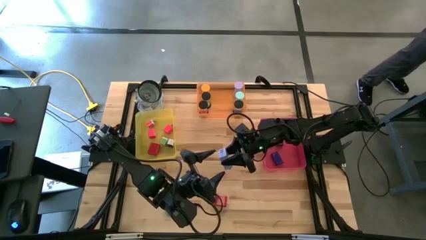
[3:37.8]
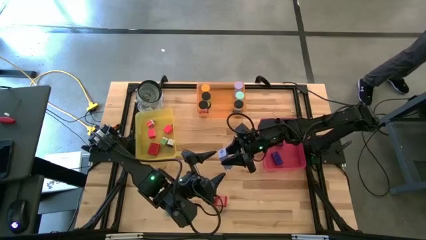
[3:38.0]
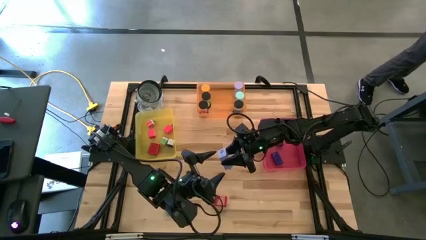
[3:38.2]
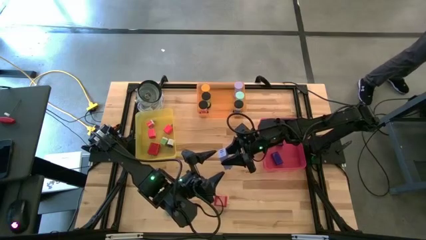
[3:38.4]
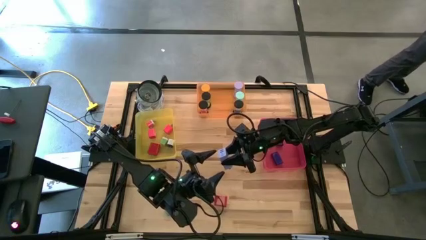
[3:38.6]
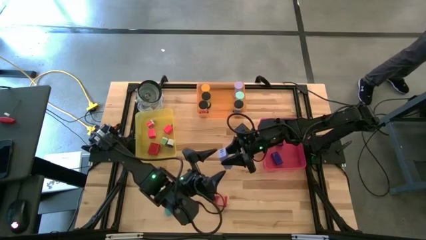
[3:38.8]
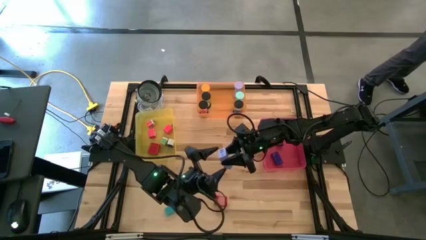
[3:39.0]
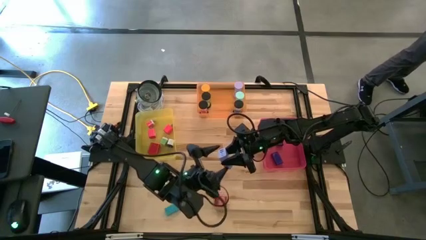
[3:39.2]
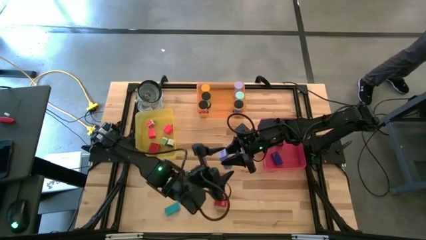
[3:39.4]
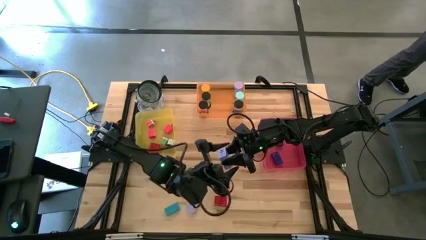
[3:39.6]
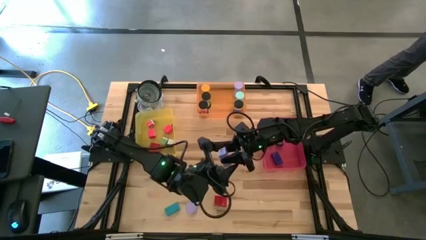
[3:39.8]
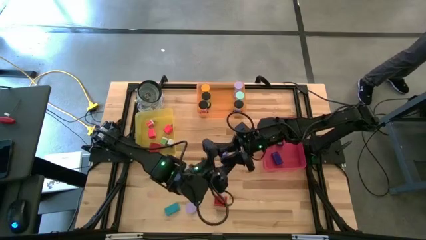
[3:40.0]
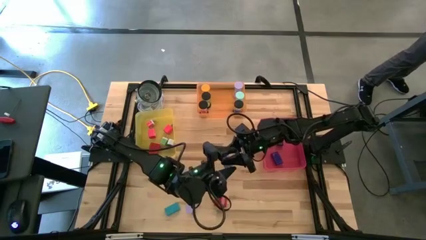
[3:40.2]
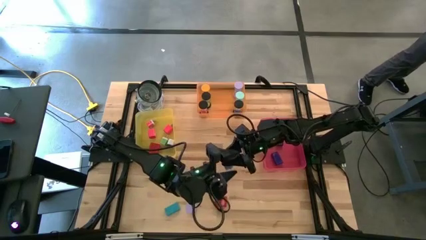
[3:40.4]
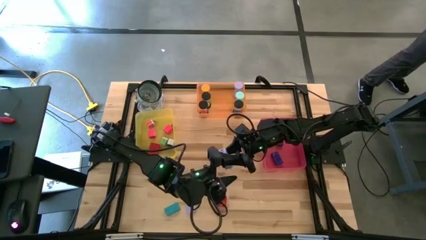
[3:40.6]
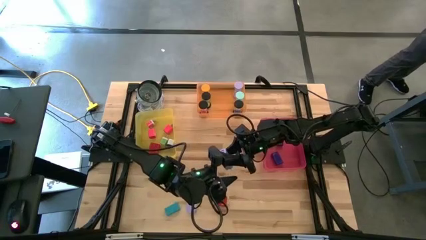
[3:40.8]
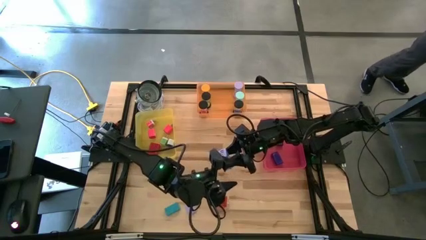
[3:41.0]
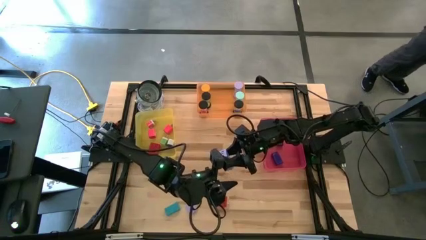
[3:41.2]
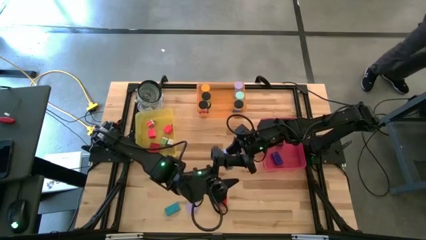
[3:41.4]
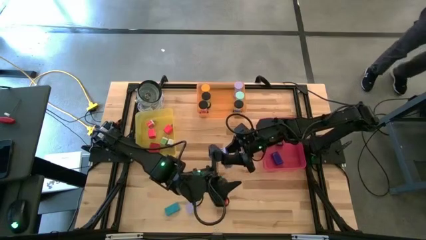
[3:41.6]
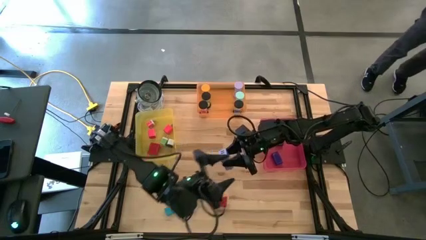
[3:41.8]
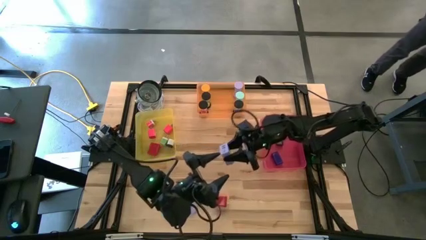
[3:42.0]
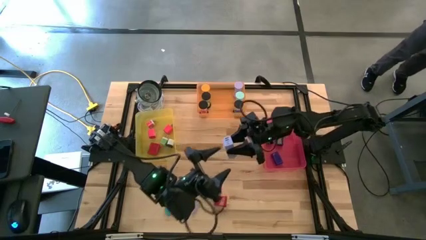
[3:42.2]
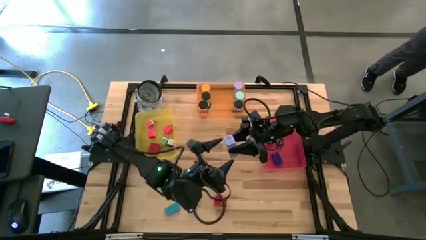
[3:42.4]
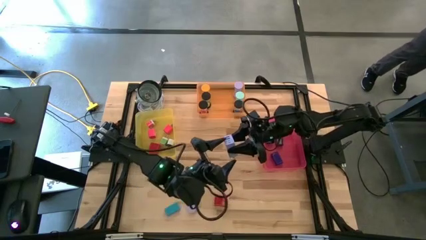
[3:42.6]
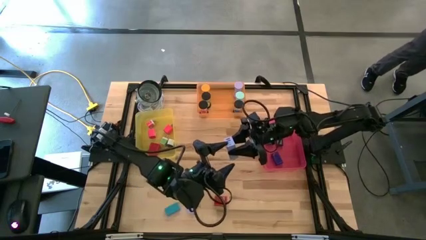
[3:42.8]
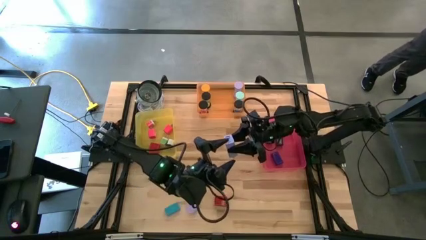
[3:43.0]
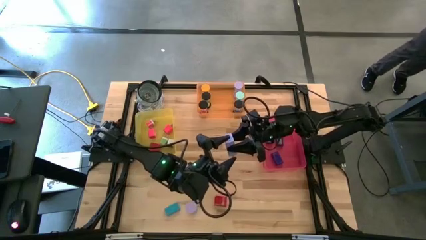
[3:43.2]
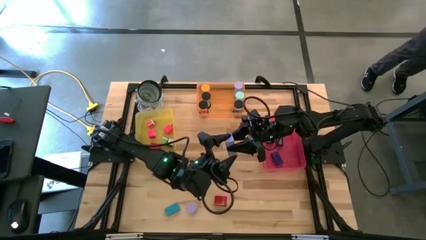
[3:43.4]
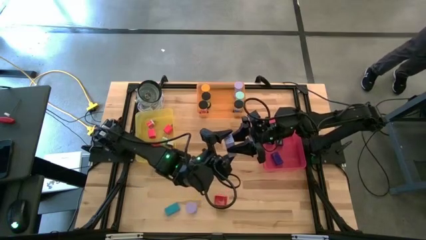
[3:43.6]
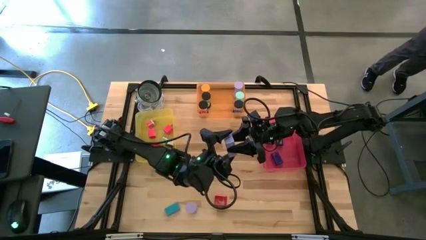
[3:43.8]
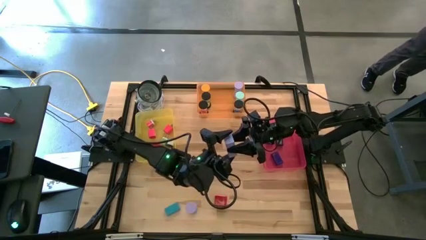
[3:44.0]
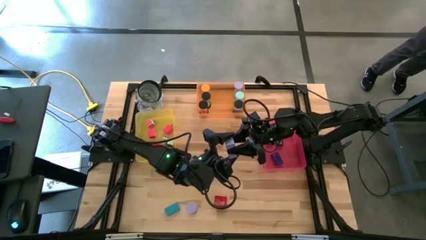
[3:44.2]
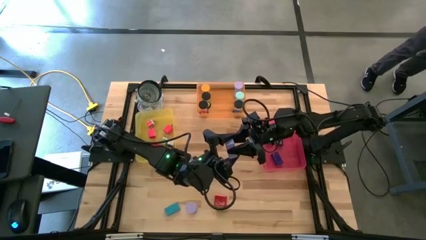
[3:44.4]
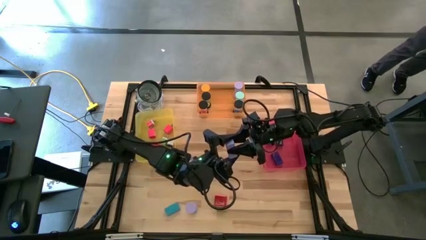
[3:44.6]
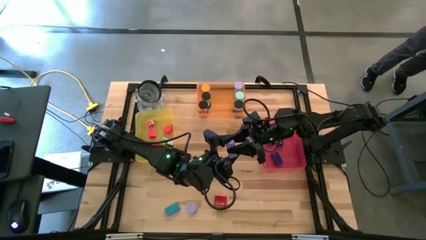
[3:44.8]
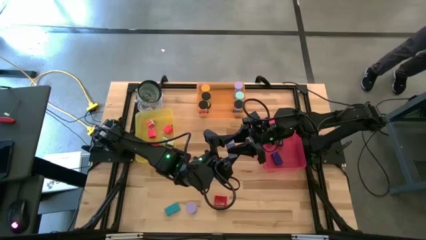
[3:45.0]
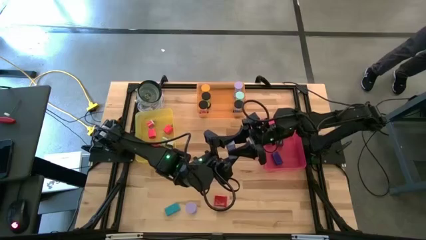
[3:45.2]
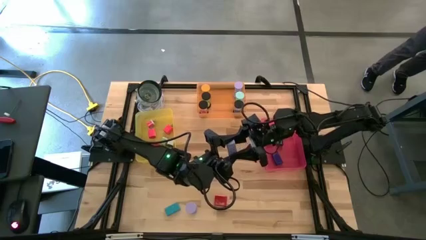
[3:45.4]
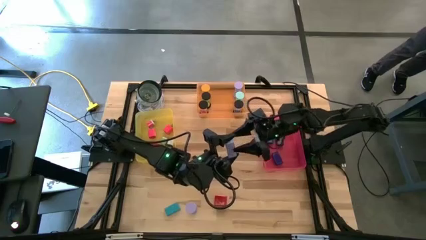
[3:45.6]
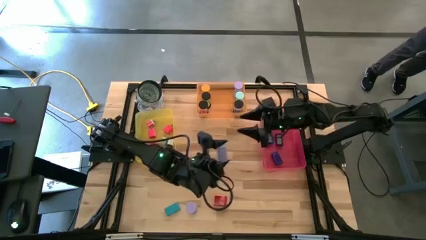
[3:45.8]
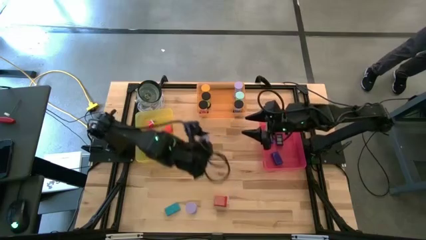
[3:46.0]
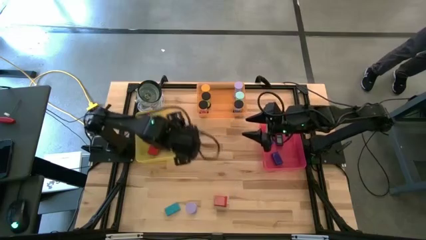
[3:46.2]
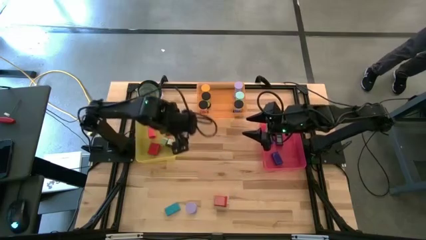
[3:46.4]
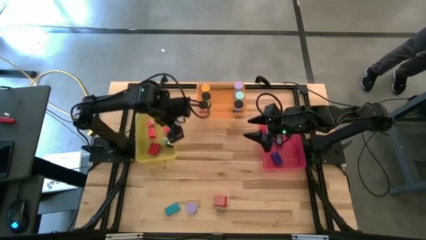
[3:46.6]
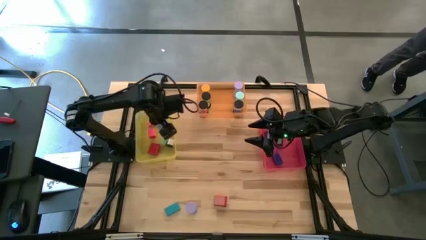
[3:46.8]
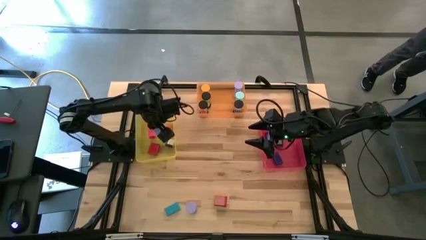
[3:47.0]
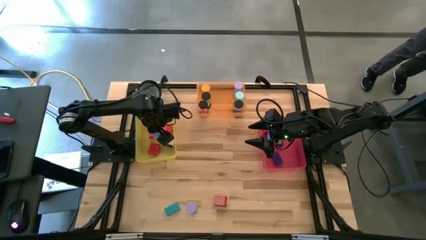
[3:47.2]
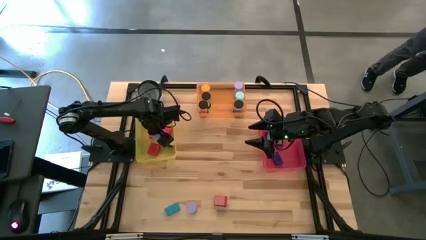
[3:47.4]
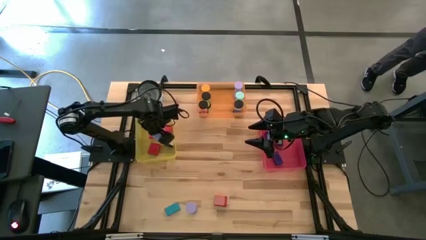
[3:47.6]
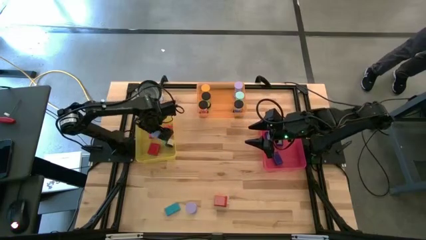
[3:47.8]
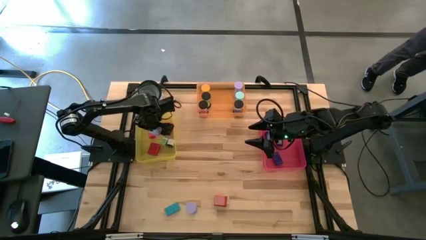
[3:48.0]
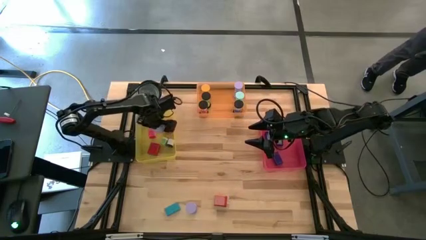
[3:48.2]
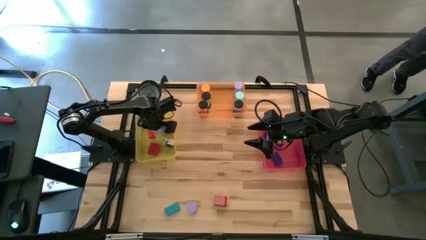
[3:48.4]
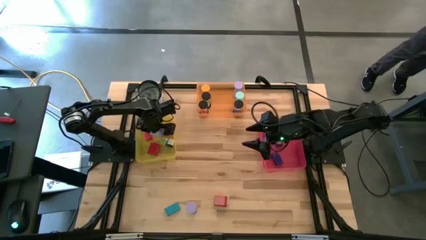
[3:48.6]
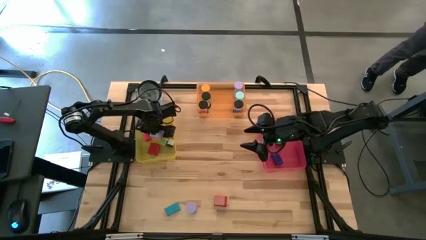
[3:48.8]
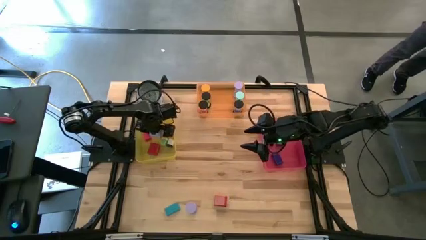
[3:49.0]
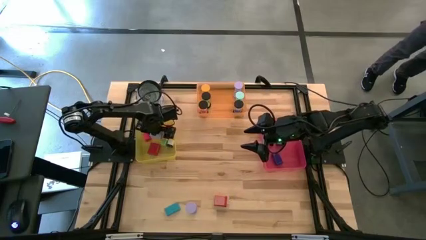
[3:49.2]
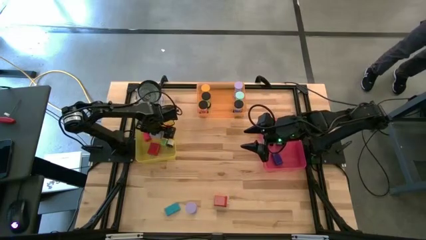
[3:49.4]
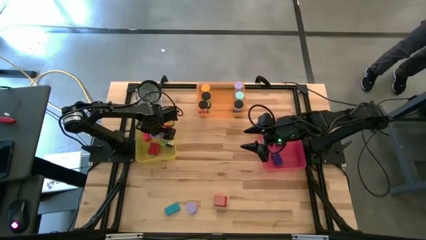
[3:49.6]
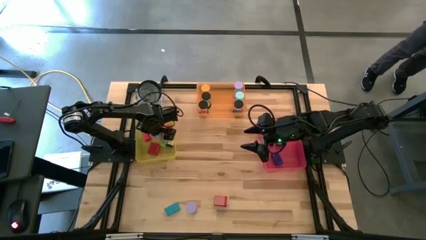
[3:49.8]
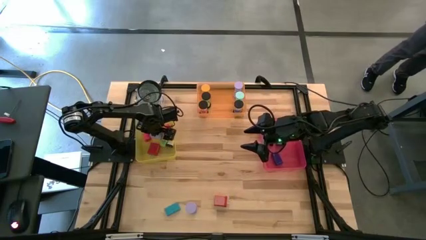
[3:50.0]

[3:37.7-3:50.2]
Task: Pick & Place Office items
Put the blue charger in the yellow bin

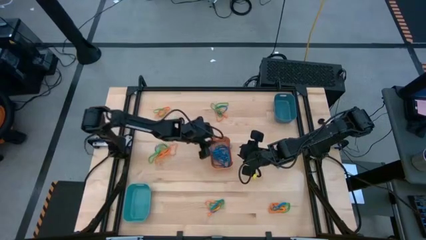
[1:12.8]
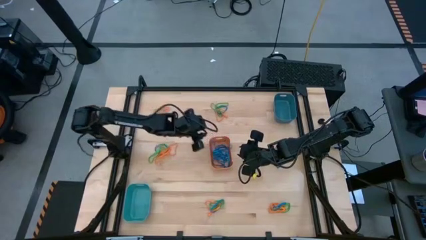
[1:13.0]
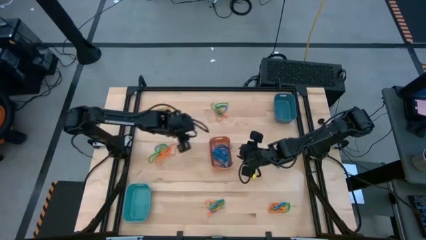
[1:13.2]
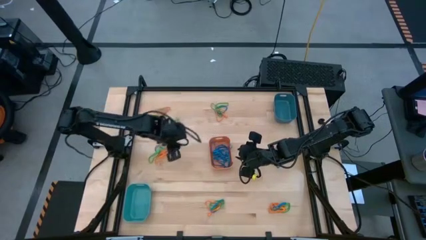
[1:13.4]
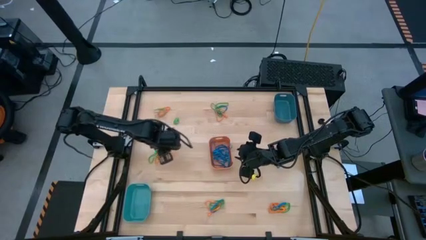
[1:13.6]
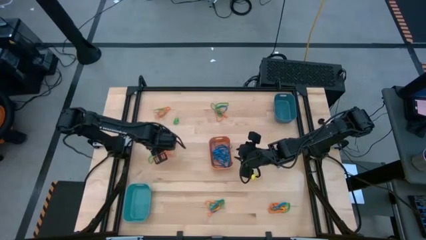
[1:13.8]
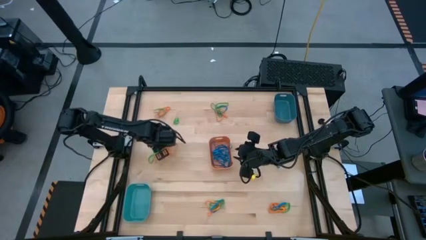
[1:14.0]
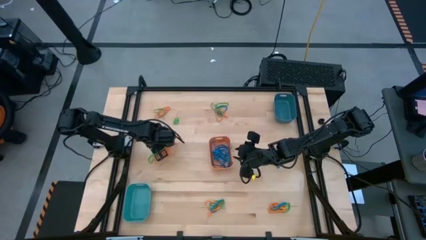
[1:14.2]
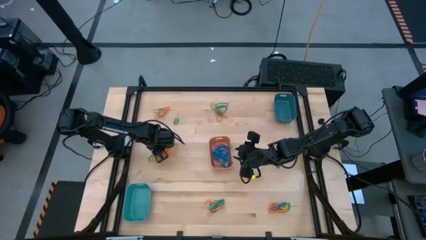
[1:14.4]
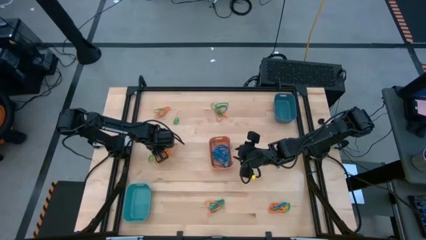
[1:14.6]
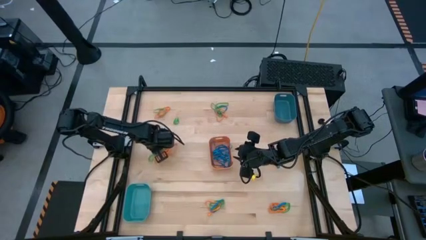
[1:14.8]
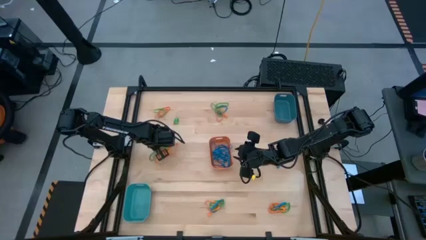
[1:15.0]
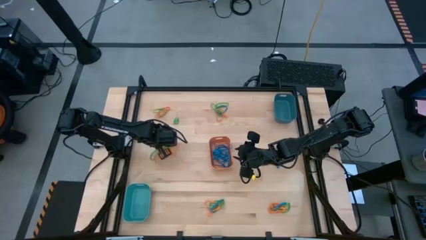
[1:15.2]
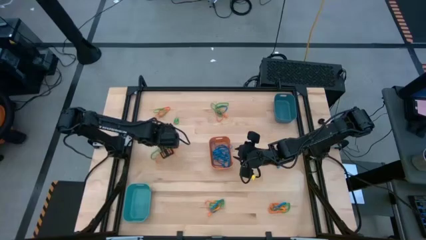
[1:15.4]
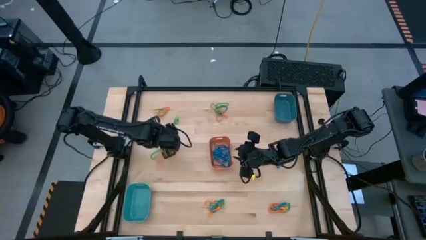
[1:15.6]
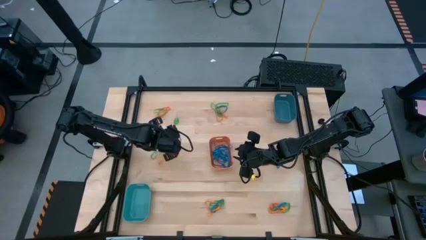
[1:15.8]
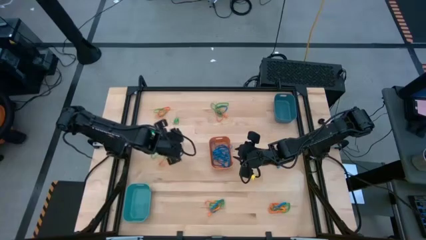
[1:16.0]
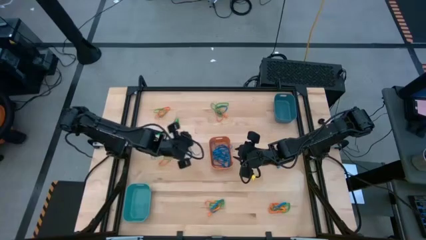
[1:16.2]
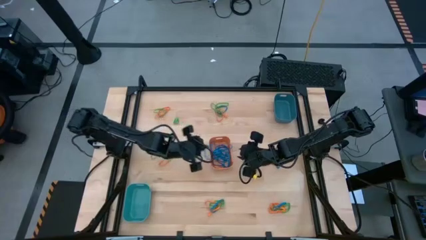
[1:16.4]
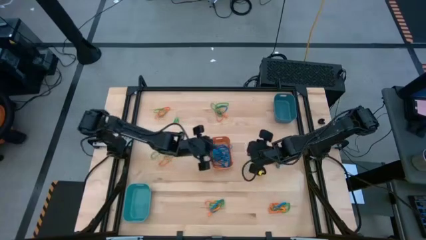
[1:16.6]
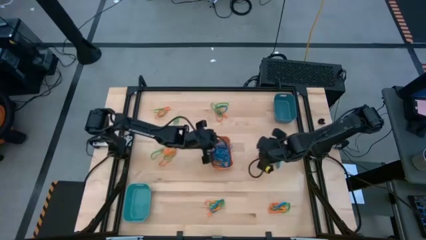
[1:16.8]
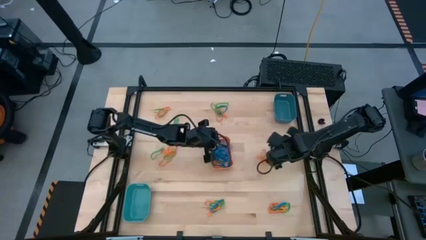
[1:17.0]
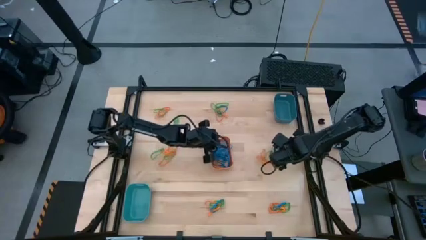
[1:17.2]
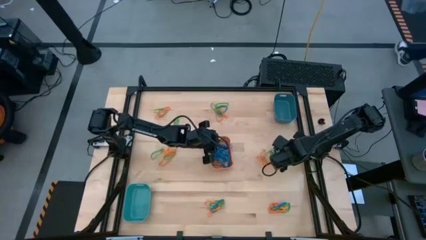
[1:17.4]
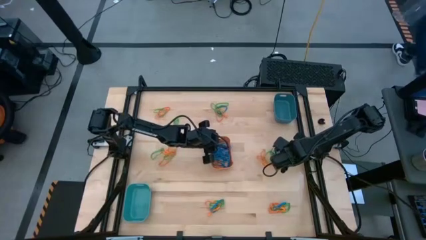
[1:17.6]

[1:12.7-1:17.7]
Task: Sort rubber bands into baskets
Put the blue rubber band into the orange bin
